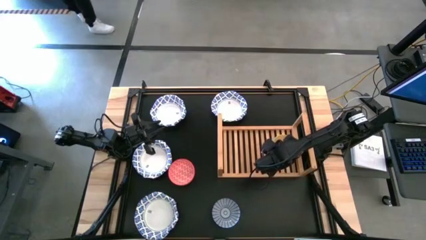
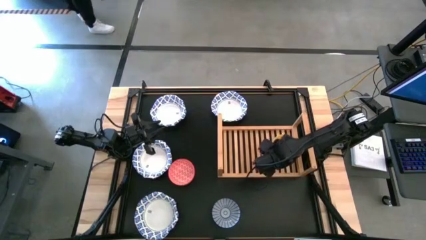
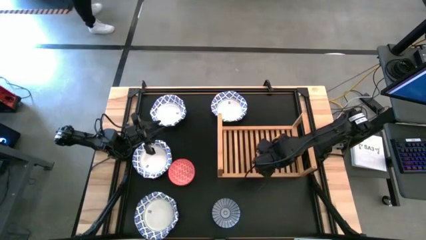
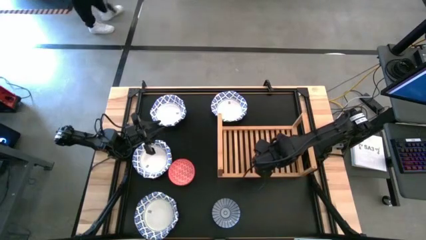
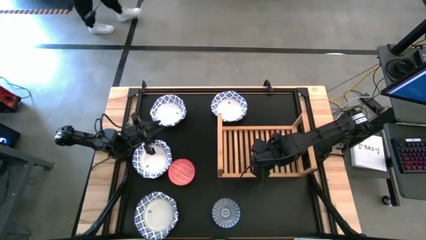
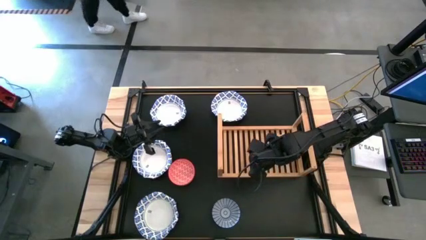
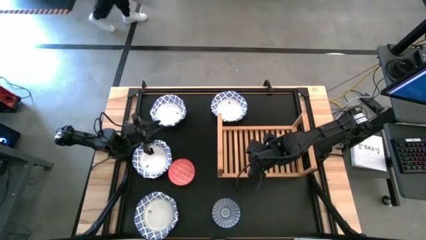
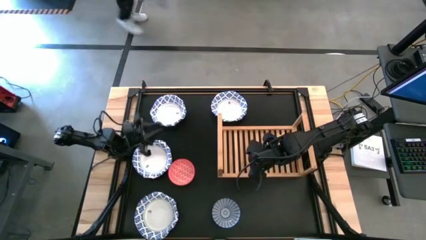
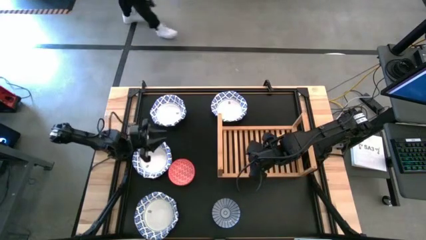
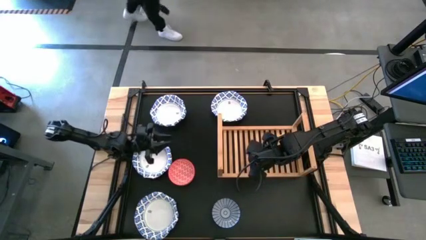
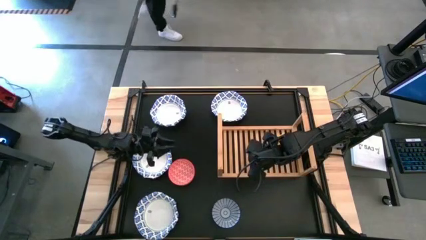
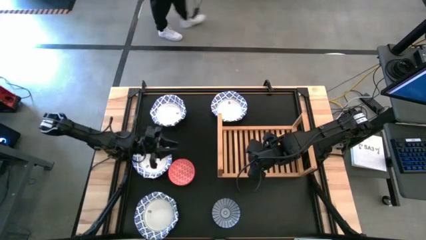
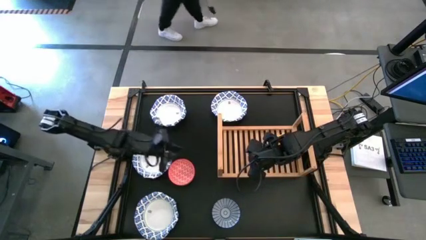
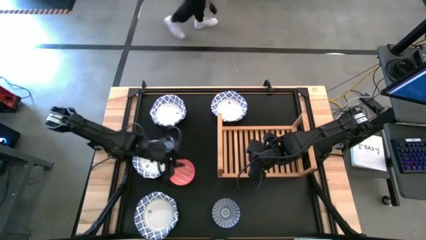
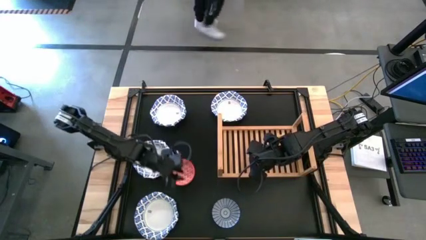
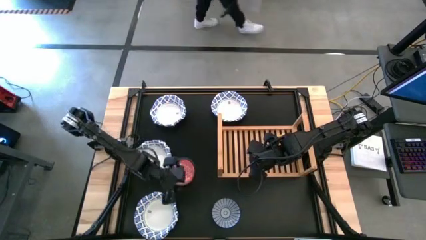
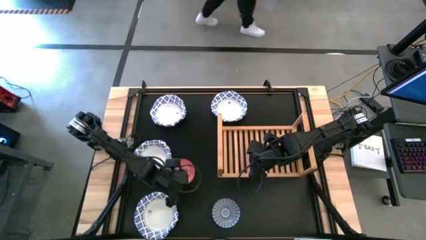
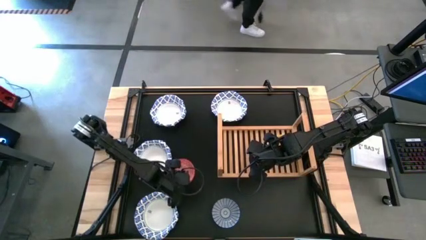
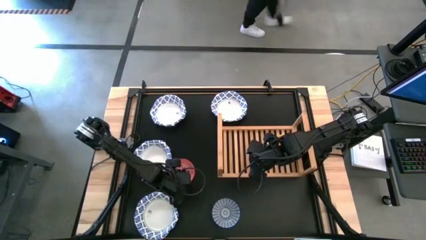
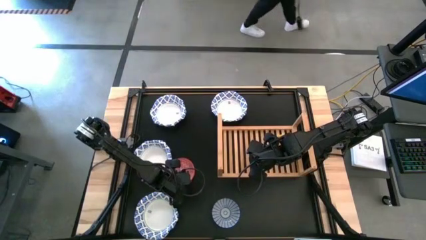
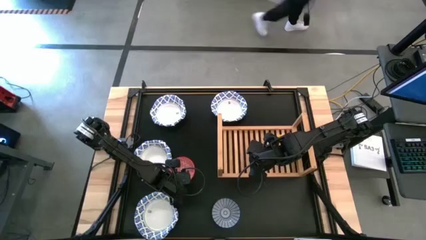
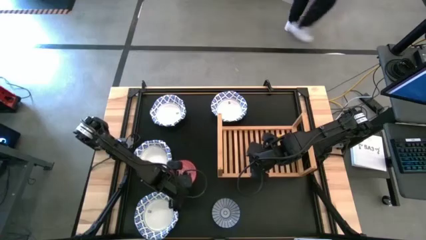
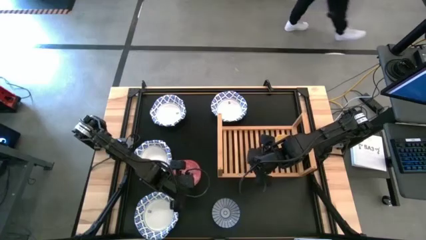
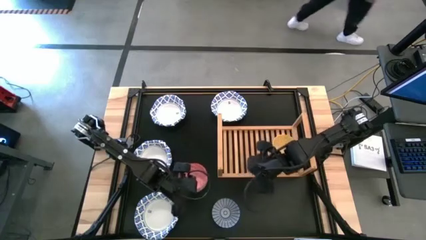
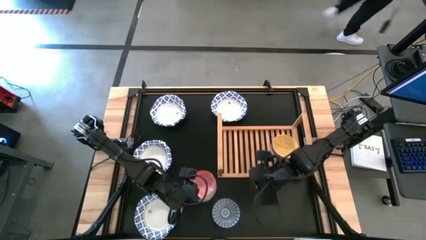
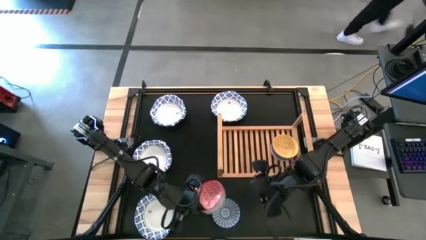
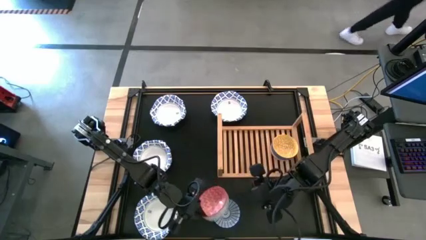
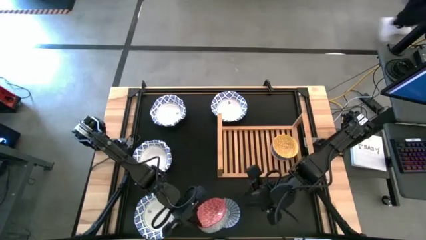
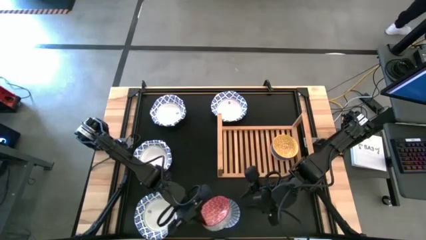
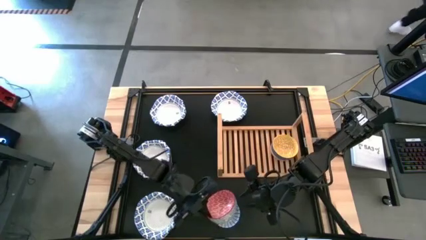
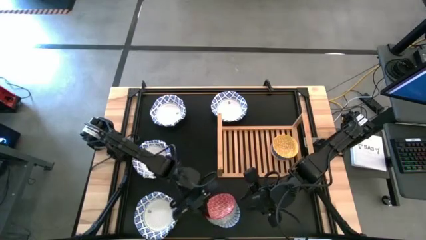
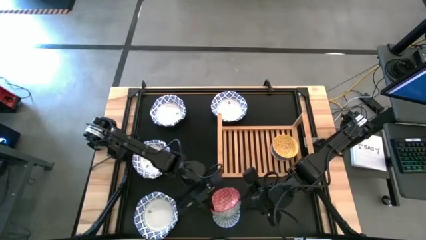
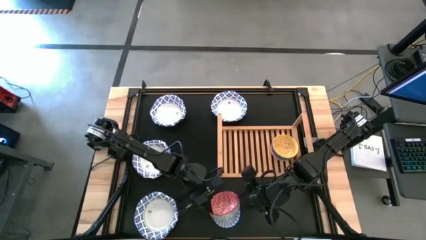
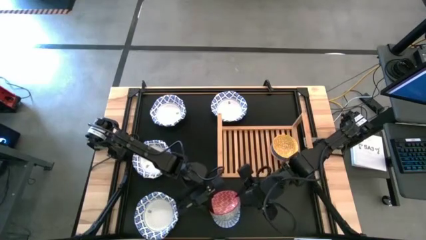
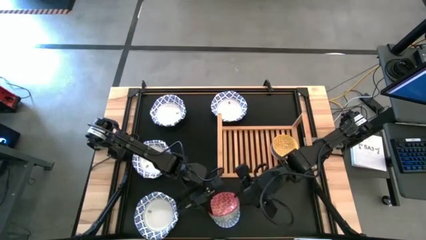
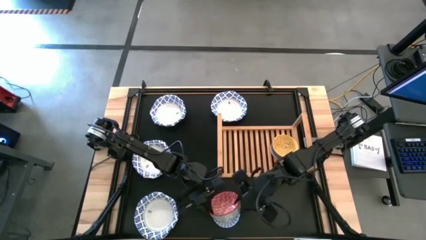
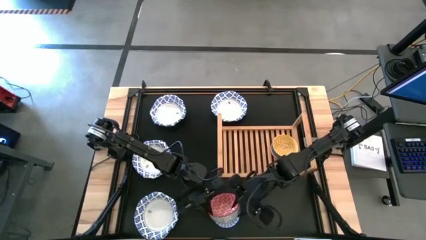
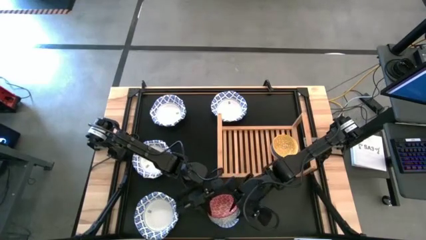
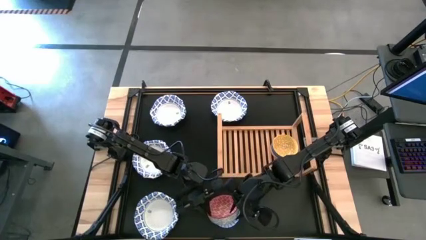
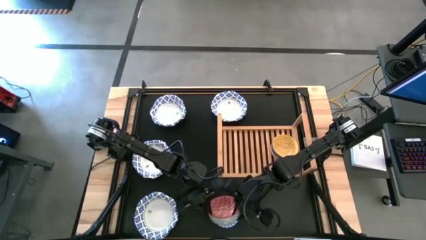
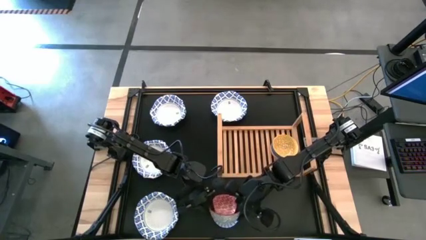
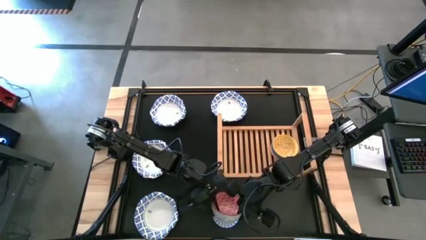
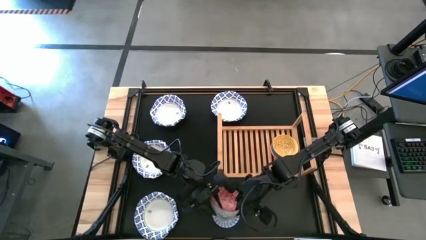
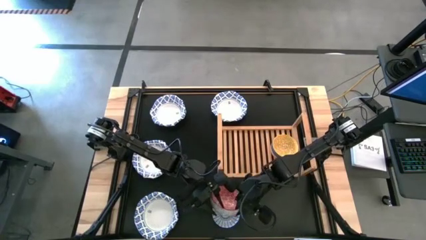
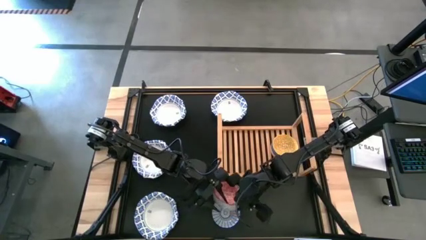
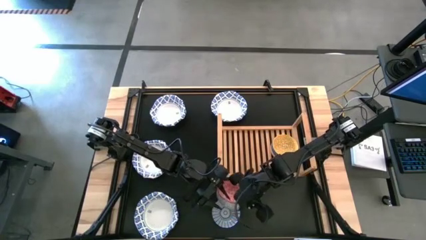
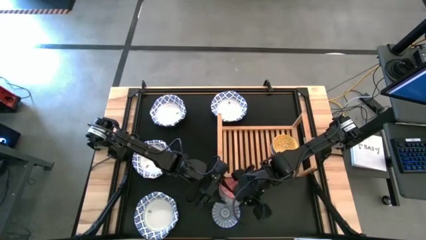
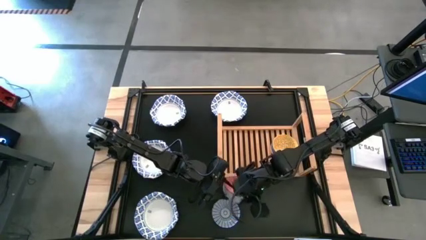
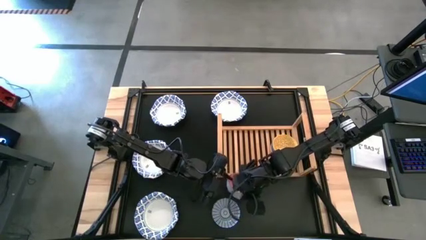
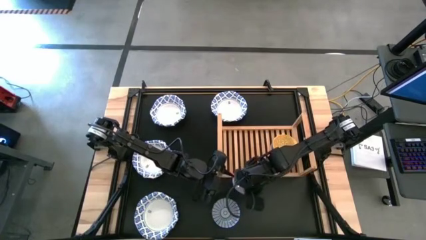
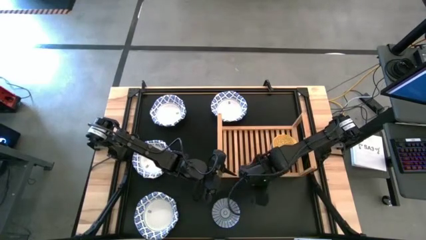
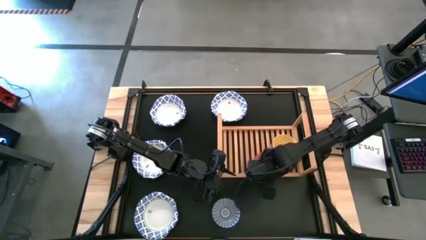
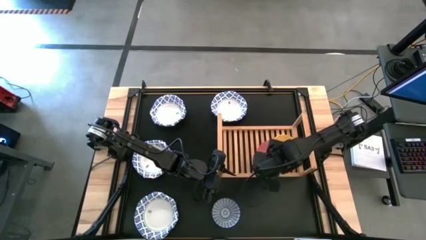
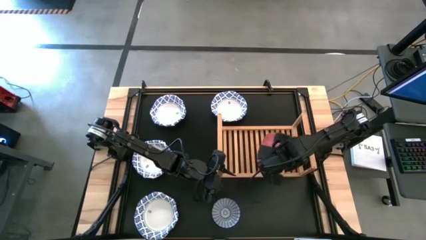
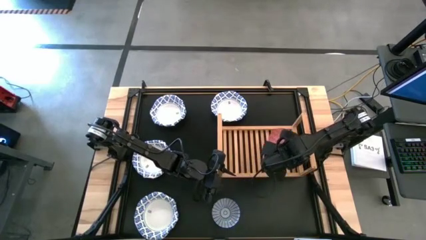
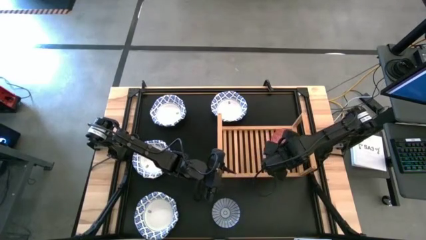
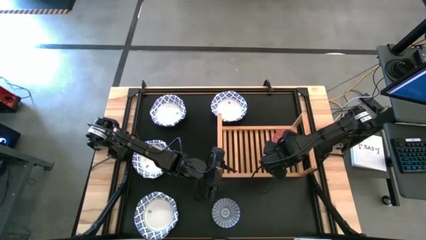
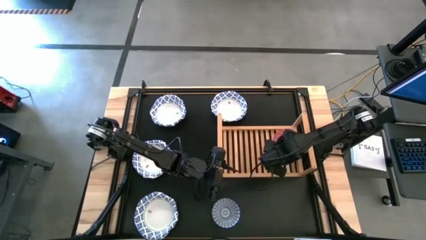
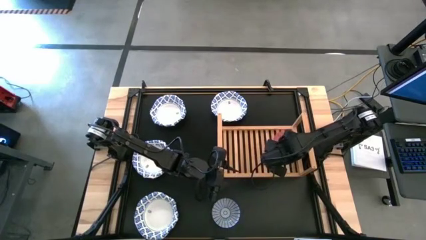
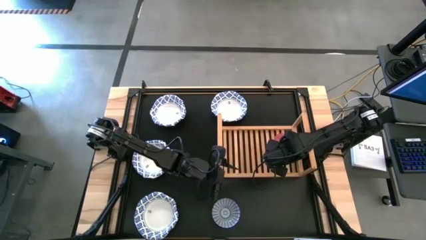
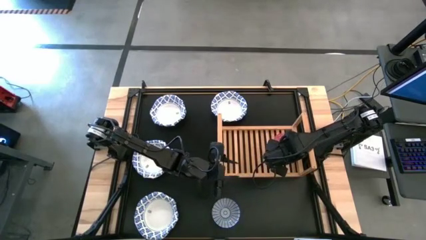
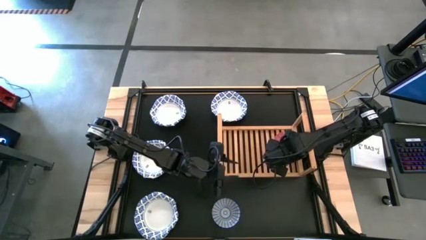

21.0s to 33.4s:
Task: Place and stack bowls onto a shelf
Stack the red patterned bowl on top of the yellow patterned bowl on the shelf

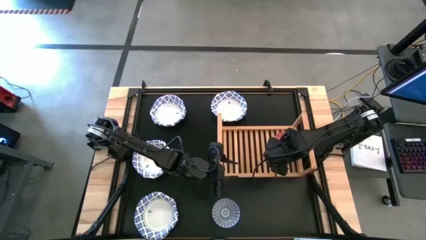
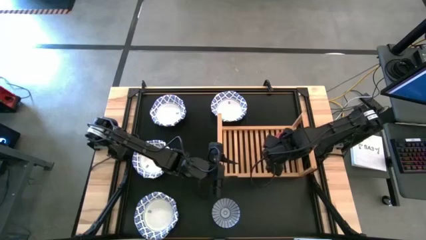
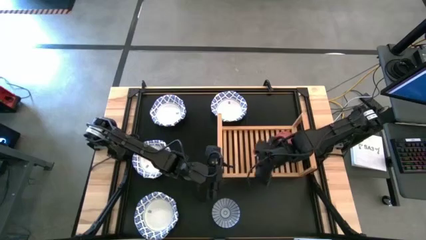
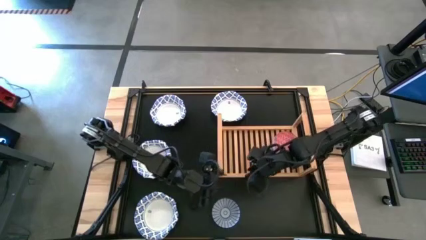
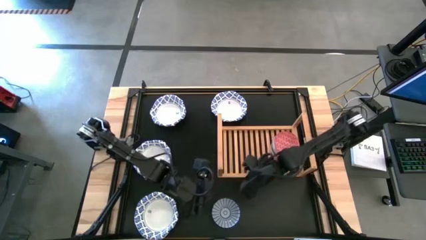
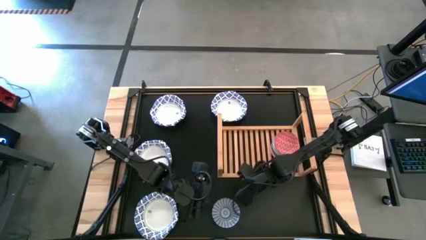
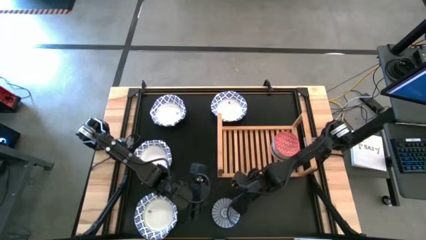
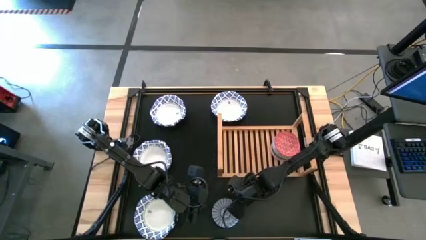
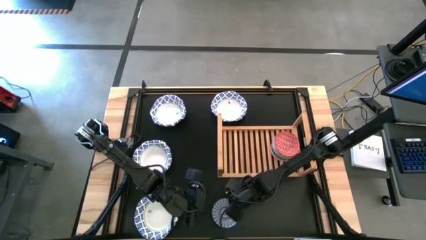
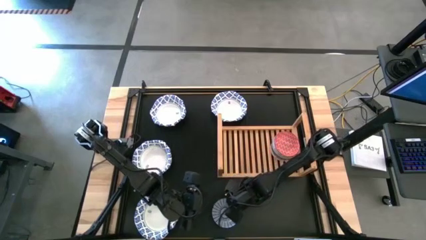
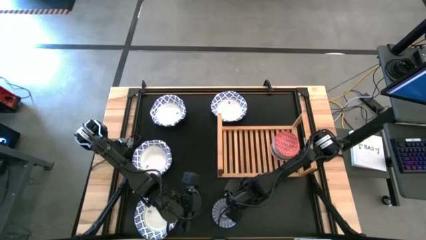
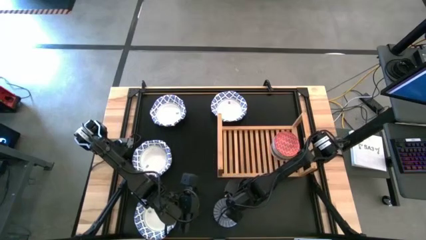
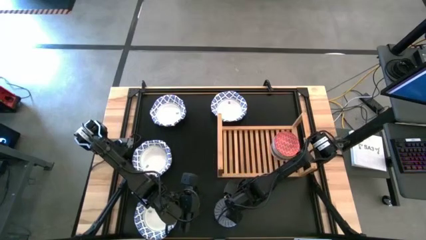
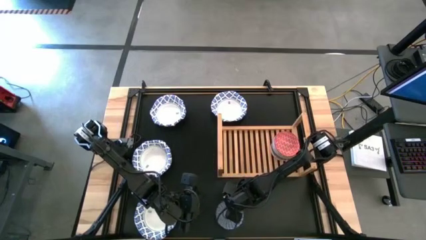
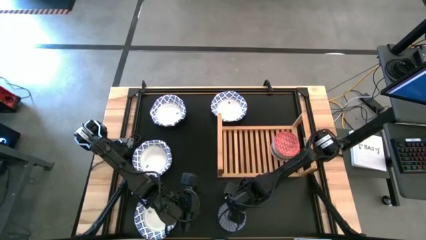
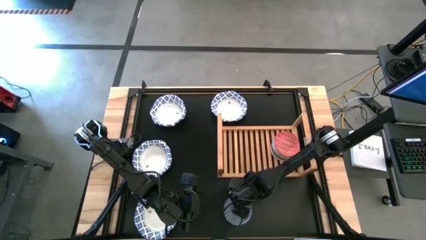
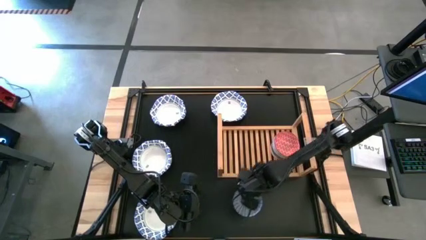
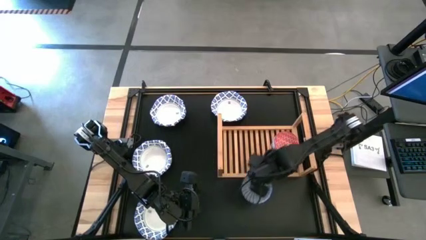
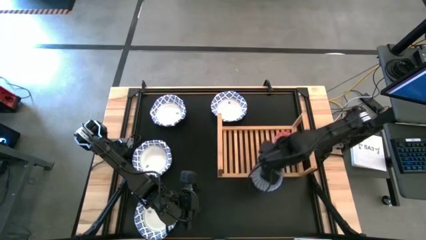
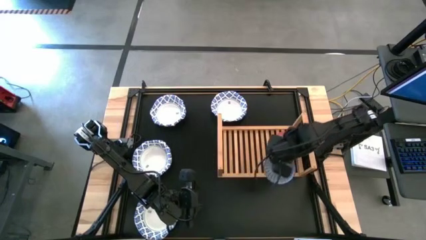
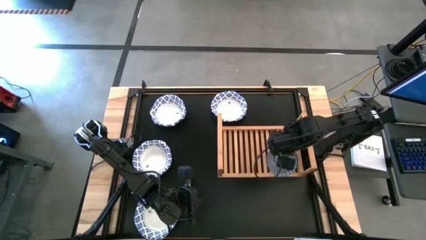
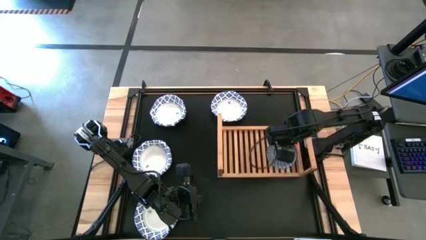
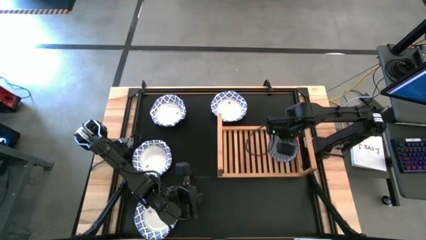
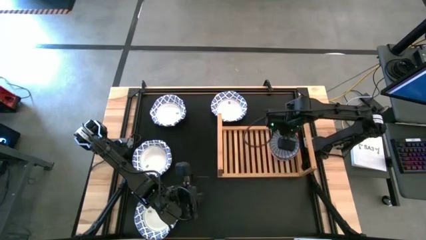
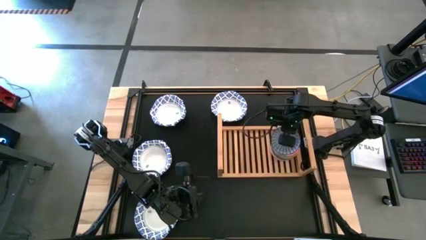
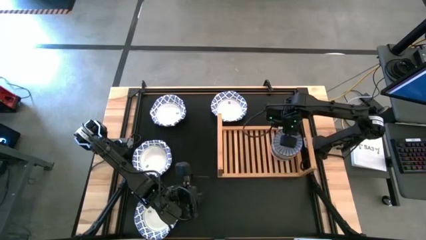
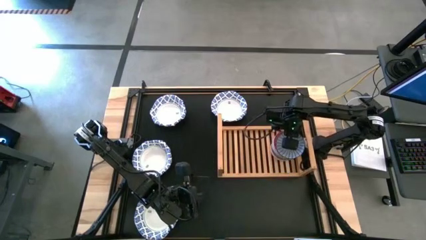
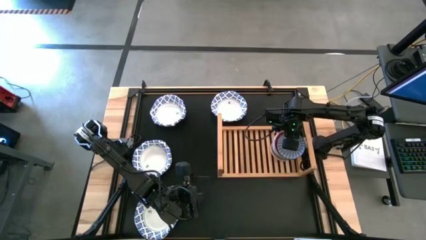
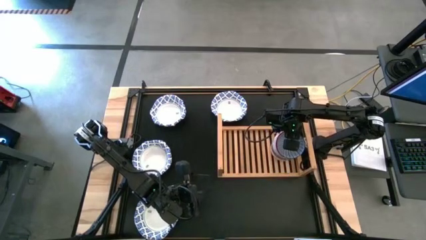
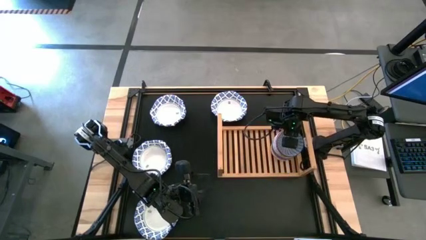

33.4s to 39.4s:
Stack the dark blue patterned bowl on top of the red patterned bowl on the shelf
